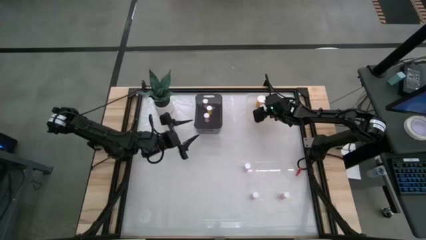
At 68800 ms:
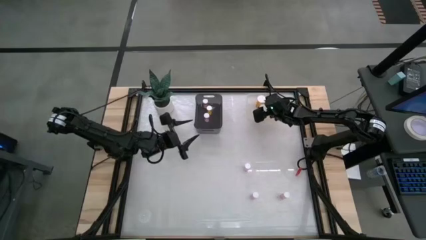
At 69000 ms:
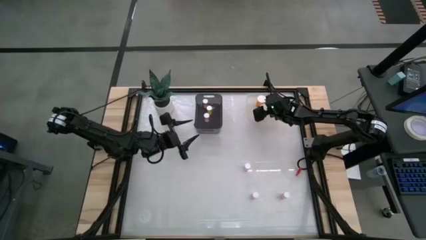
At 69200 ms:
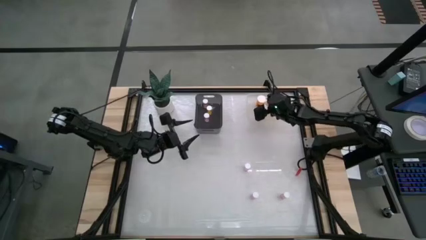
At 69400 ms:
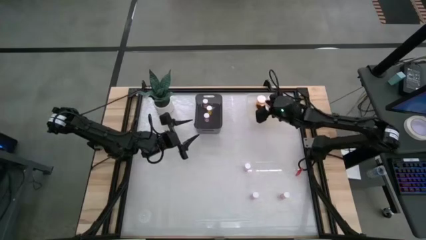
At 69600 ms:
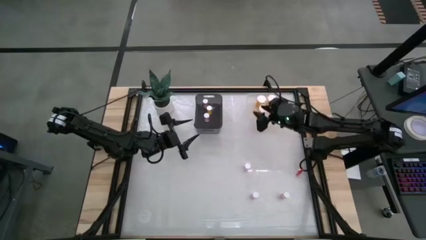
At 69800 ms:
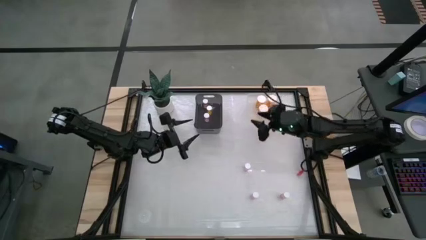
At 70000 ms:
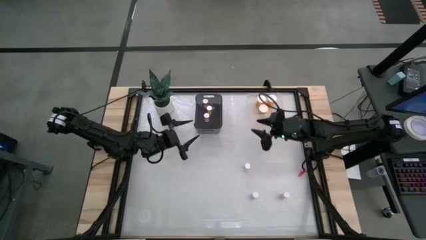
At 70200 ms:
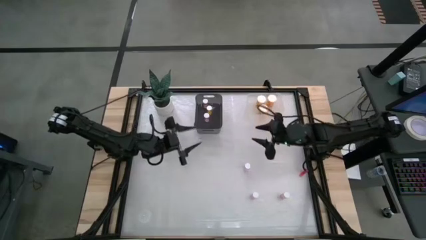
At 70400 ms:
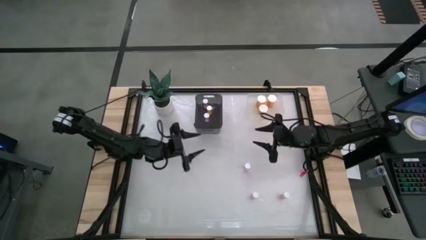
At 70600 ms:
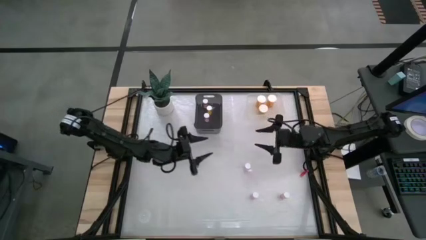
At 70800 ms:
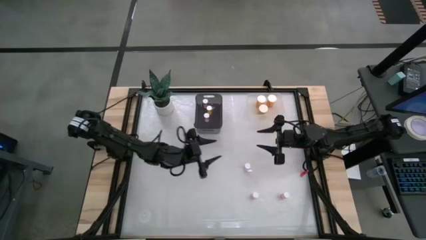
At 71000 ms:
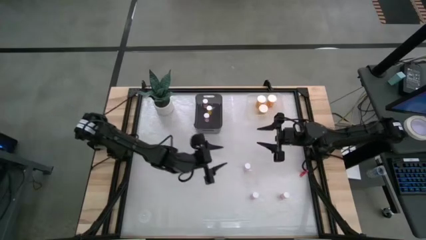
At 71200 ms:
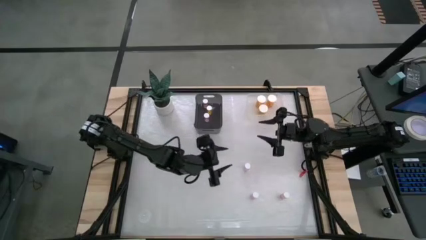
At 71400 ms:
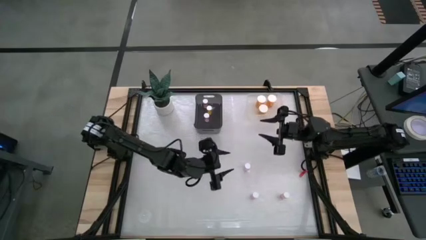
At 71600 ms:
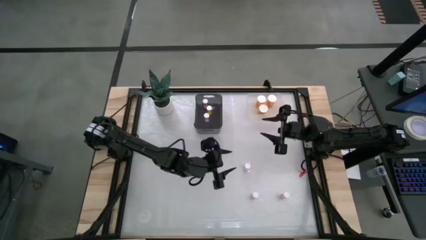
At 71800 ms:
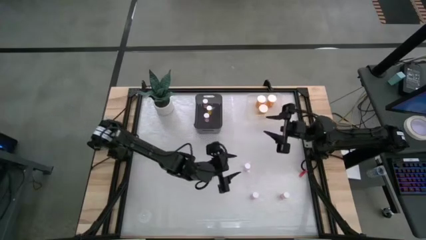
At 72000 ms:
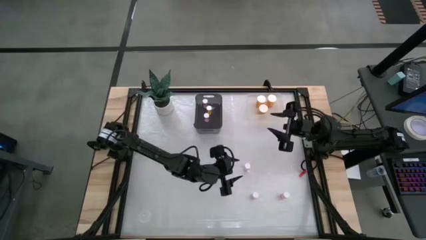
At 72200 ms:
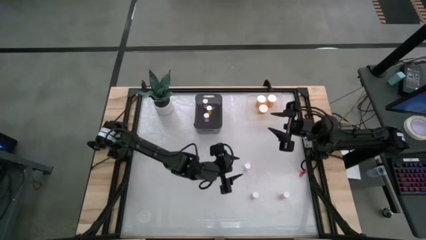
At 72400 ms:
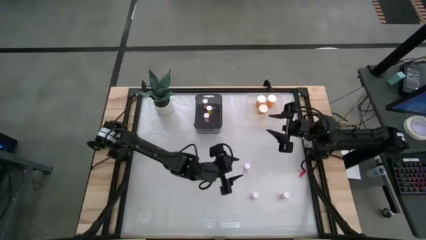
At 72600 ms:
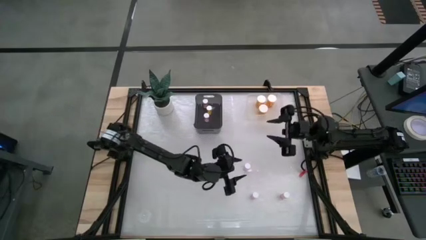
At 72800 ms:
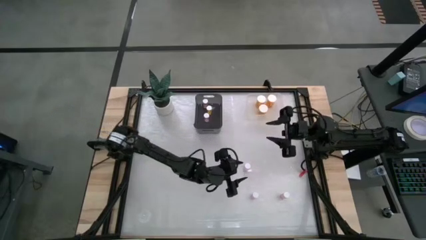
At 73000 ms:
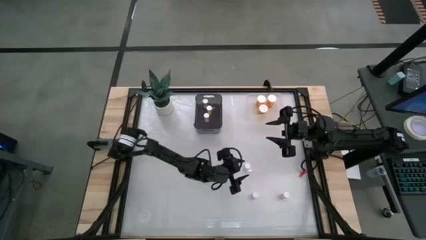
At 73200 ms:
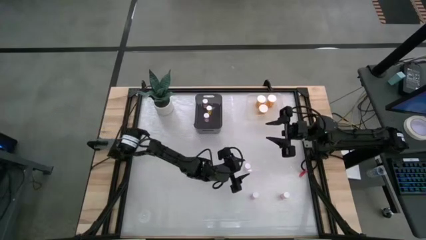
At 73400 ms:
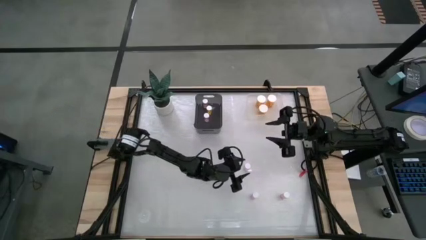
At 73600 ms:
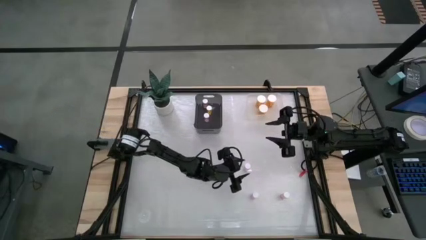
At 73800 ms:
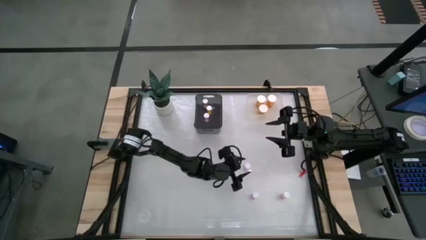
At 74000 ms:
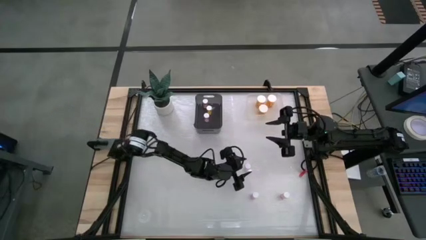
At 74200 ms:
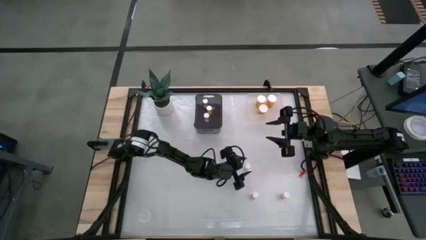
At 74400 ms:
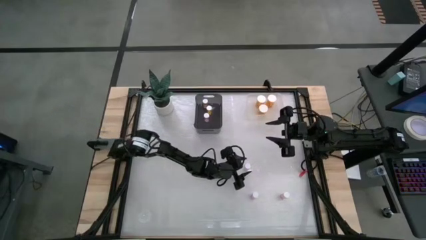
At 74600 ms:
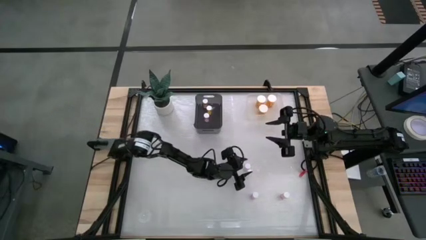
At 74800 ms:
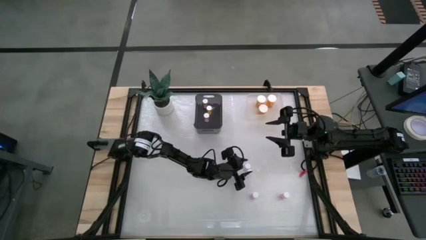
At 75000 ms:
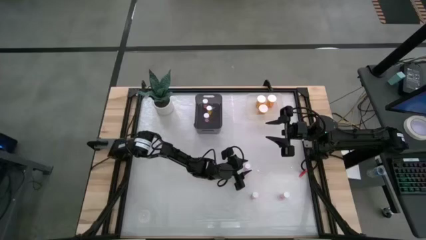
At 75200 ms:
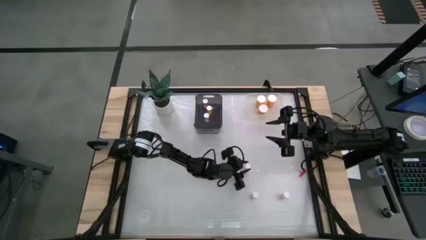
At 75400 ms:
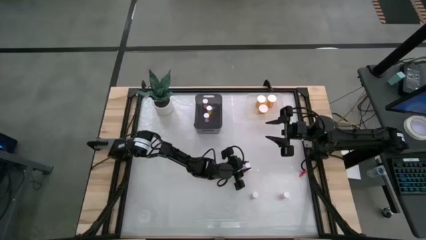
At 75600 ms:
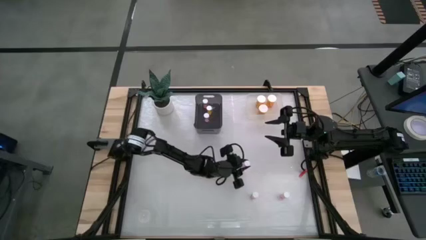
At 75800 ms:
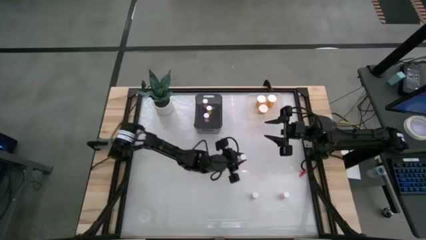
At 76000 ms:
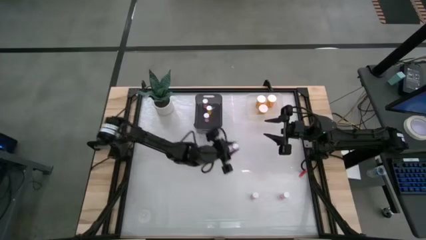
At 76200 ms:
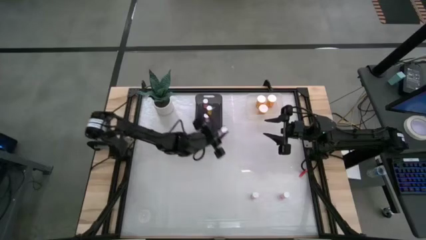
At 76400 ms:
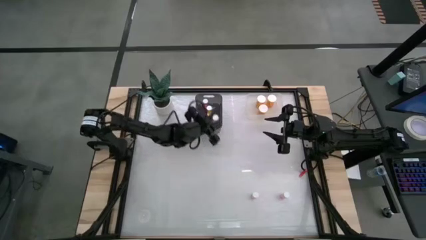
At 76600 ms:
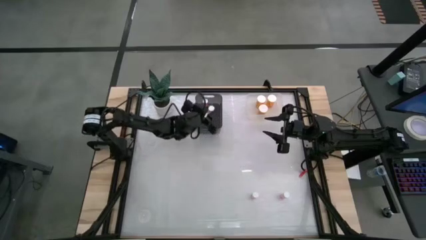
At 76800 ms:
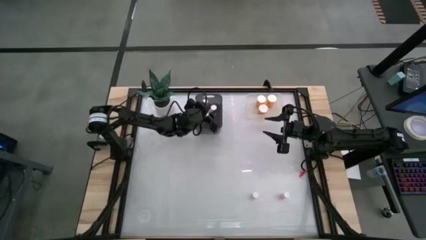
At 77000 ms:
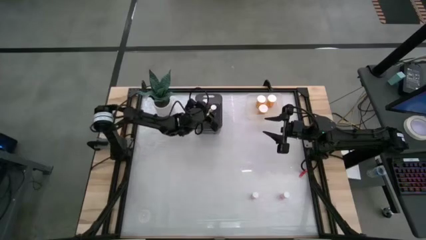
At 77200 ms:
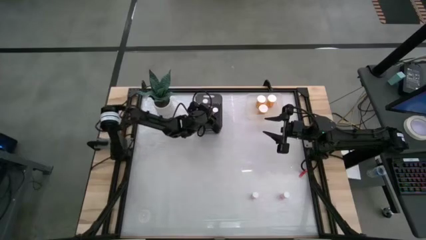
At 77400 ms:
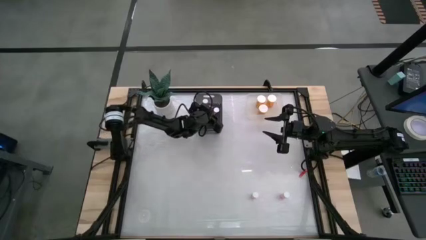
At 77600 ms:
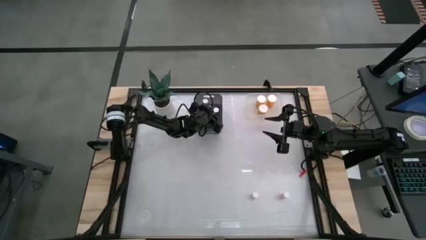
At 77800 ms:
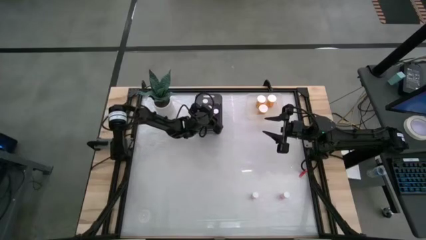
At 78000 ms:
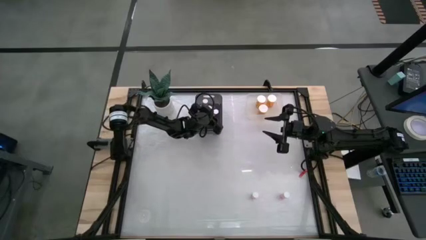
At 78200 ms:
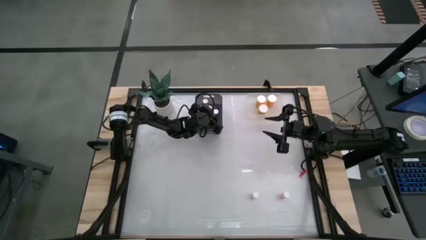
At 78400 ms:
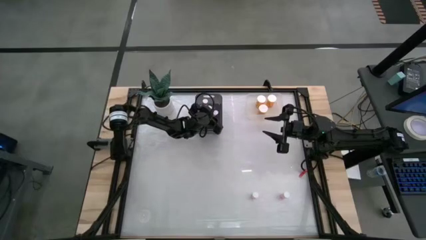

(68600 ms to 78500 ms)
Task: Pick and place medicine bottles into bin by pill shape (circle, oval)
Put the small pink pill bottle into the black bin
